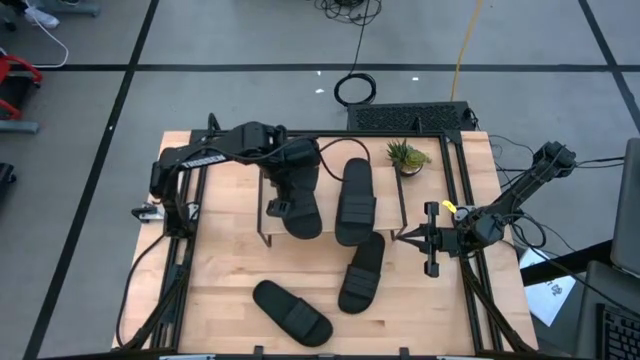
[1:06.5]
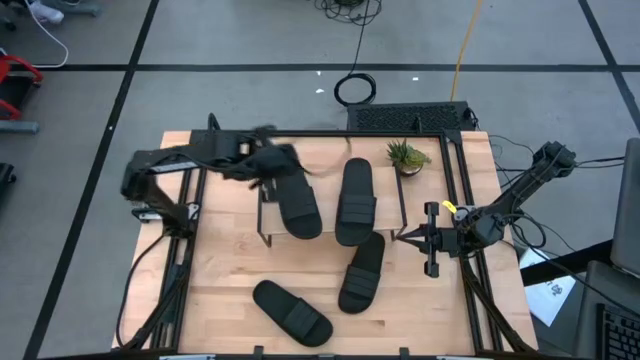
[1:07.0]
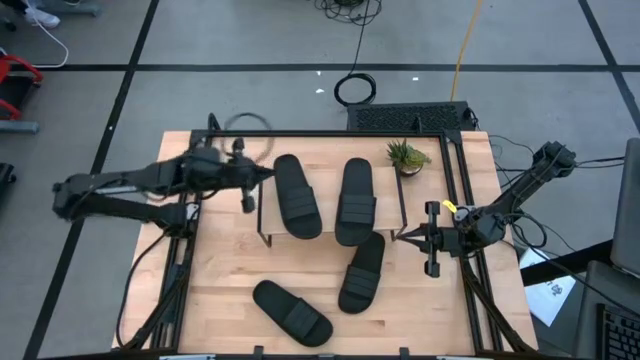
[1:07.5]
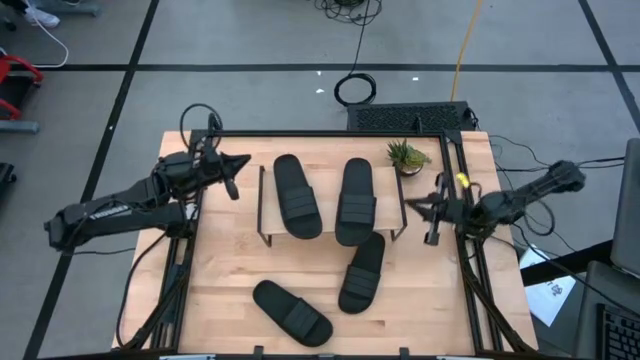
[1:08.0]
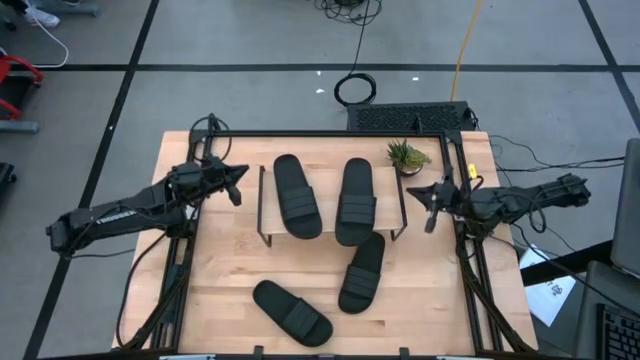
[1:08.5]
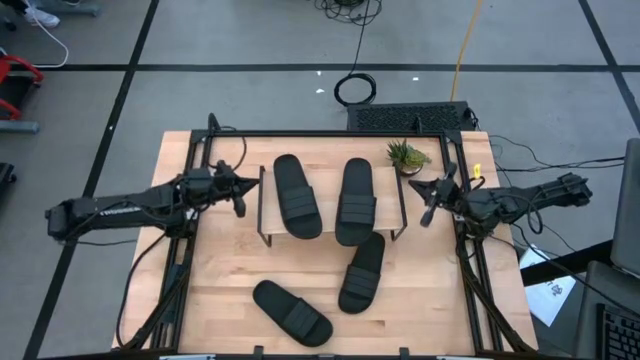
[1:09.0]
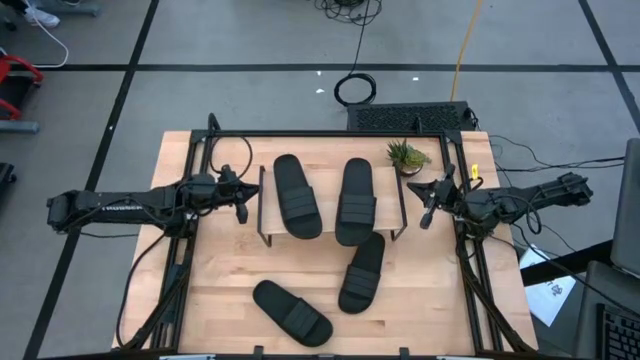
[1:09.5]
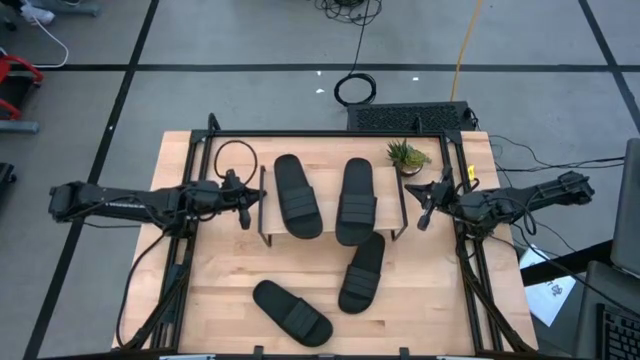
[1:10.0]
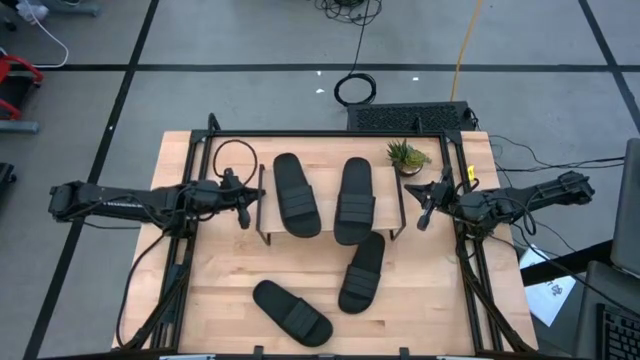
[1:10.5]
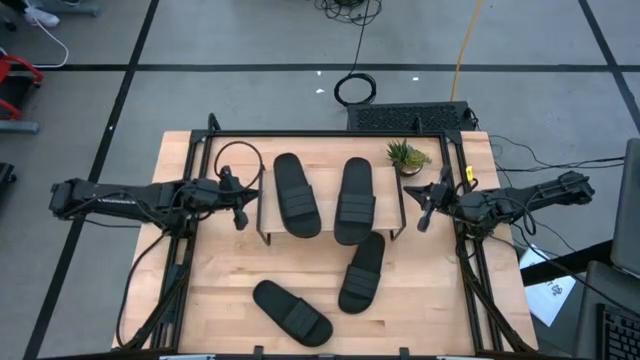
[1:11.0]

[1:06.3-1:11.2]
Task: Pick and place slides into the shelf
Adjust the shelf

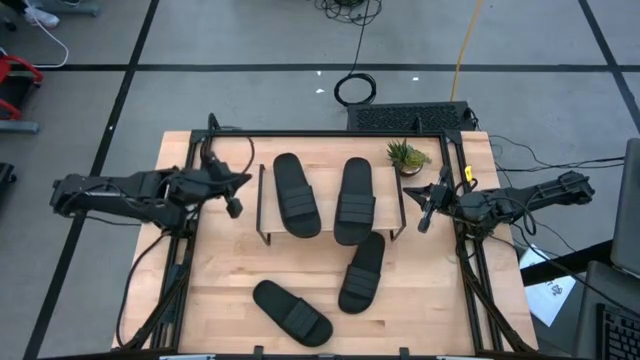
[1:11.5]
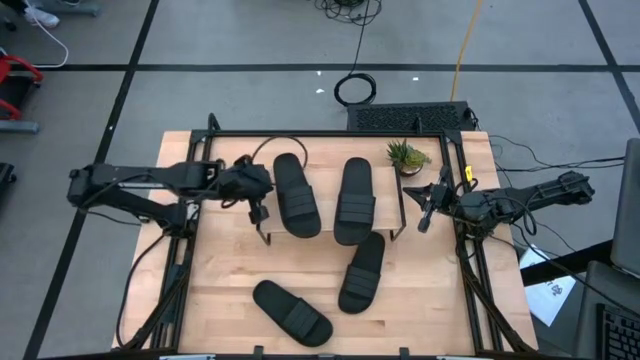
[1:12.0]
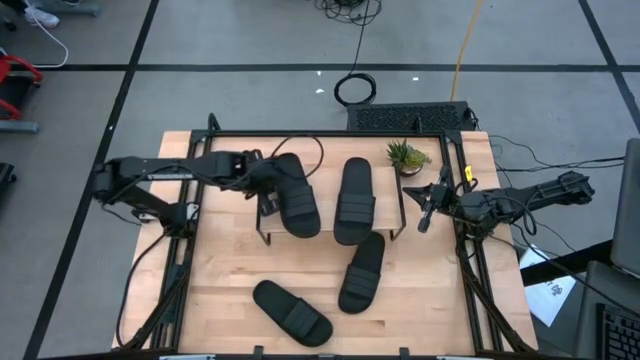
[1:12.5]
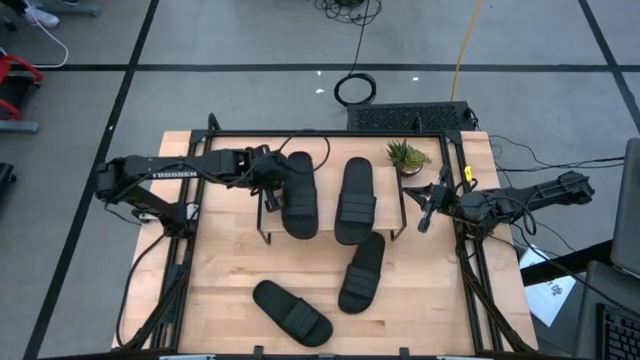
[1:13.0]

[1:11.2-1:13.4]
Adjust the black slide from the shelf

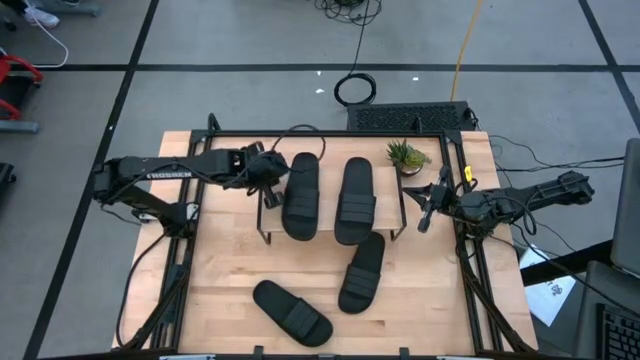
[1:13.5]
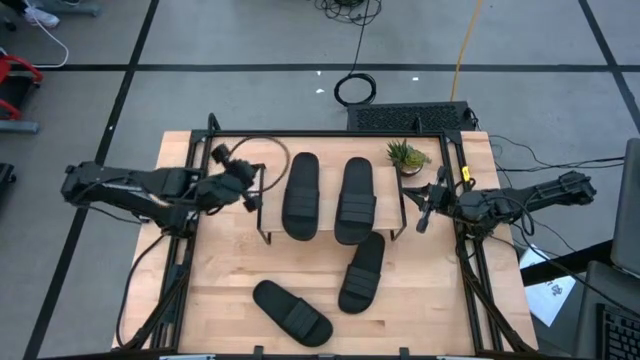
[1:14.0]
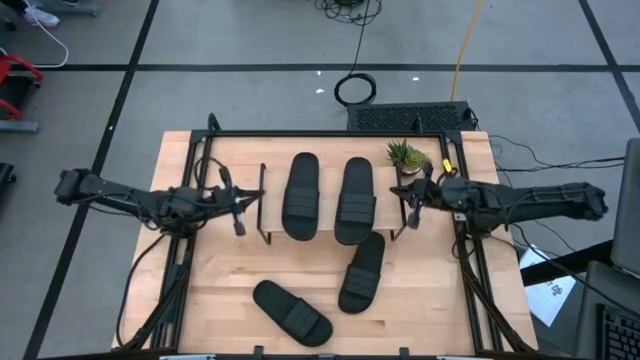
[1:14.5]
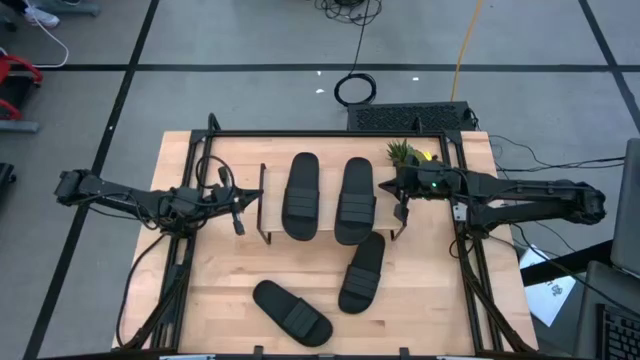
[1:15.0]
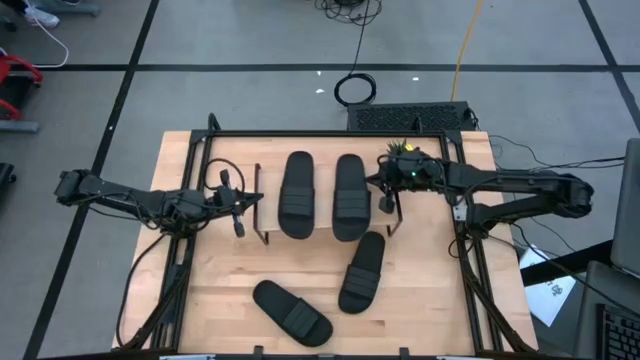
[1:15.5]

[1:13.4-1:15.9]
Adjust the black slide from the shelf

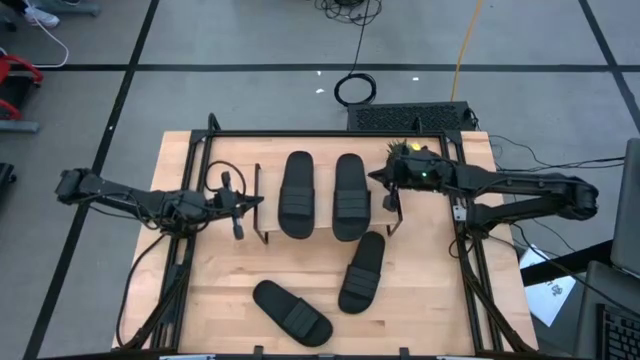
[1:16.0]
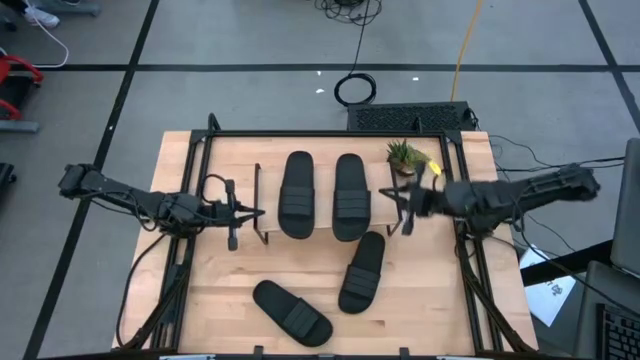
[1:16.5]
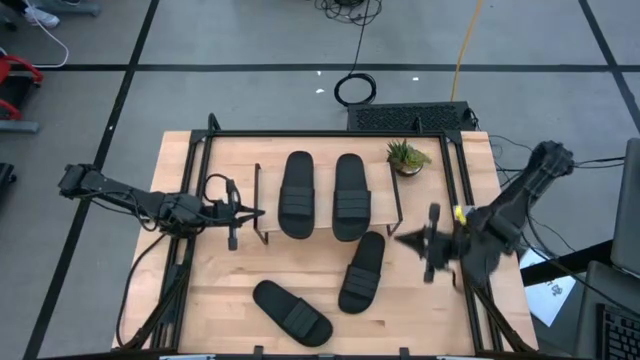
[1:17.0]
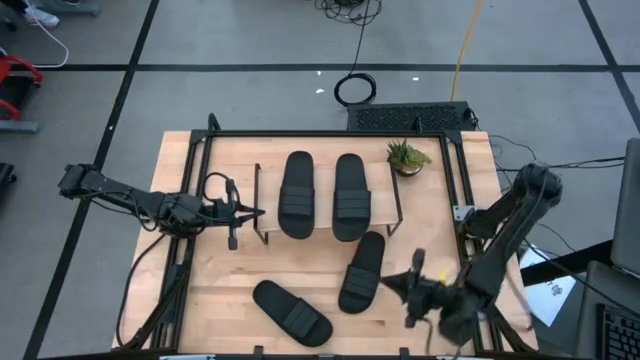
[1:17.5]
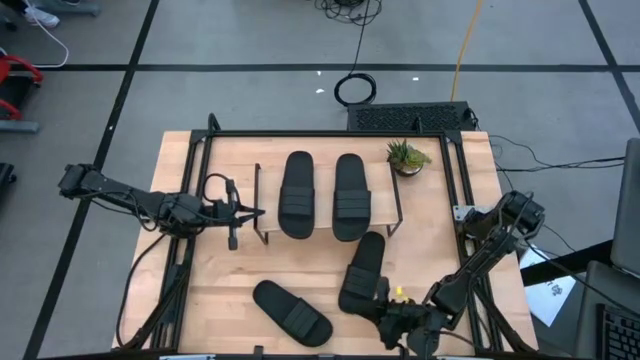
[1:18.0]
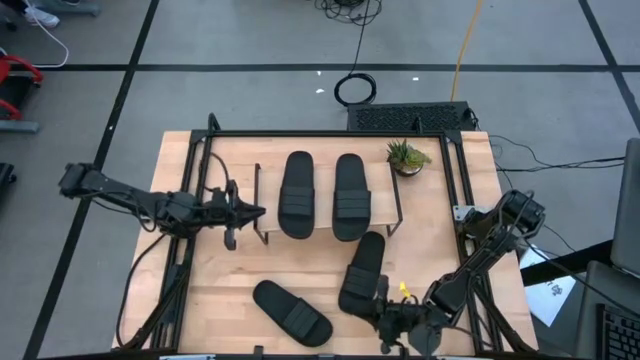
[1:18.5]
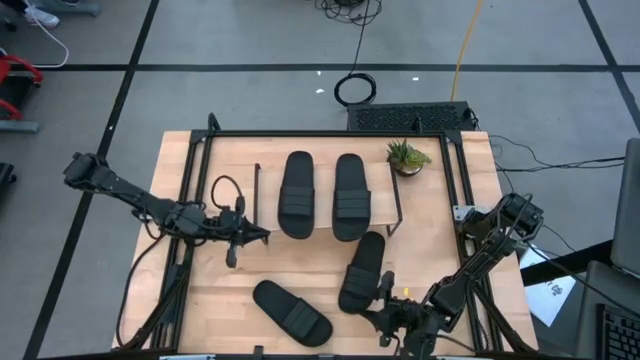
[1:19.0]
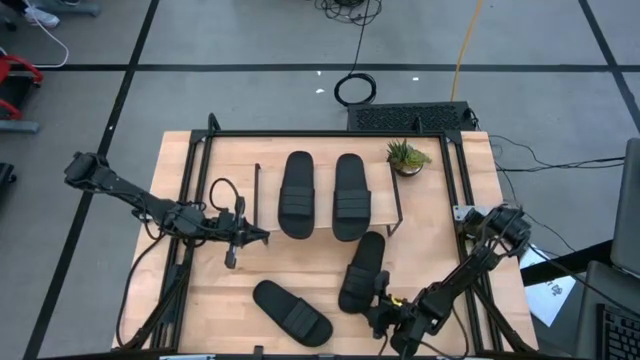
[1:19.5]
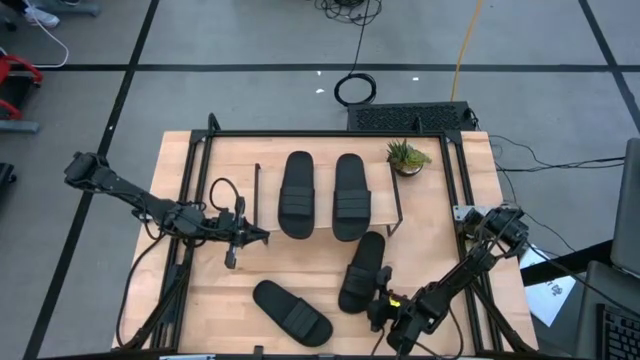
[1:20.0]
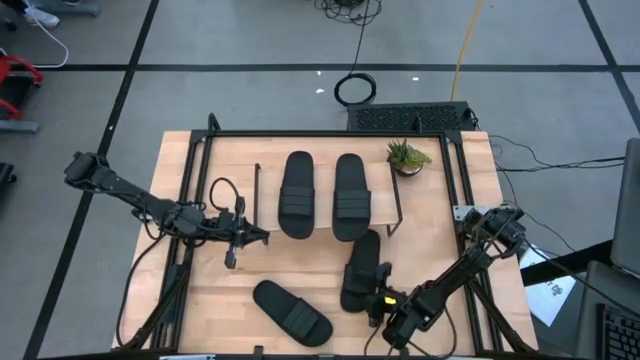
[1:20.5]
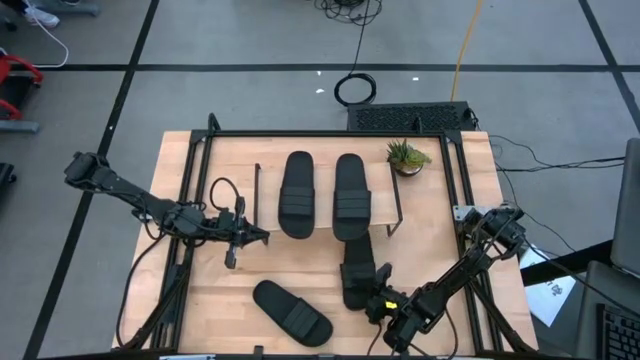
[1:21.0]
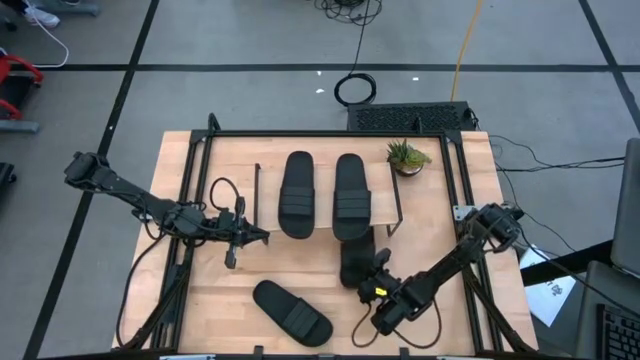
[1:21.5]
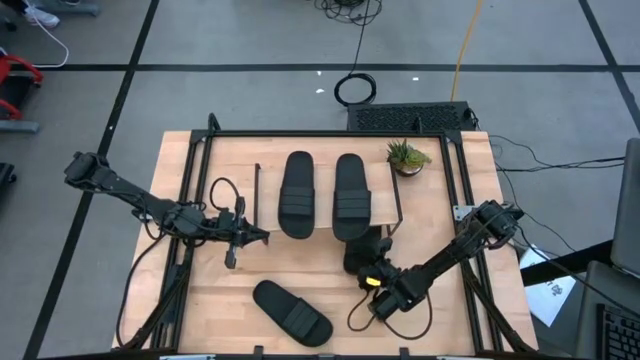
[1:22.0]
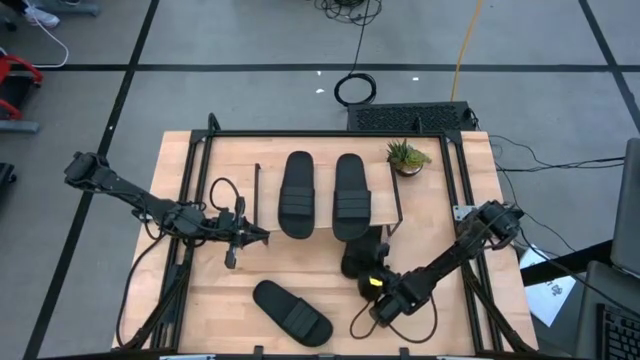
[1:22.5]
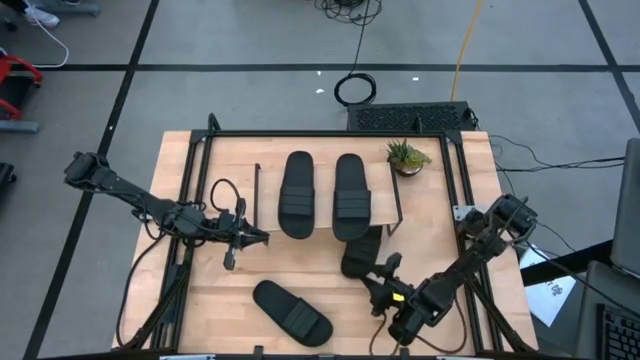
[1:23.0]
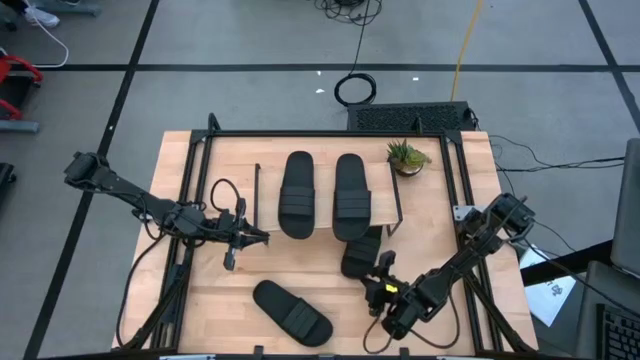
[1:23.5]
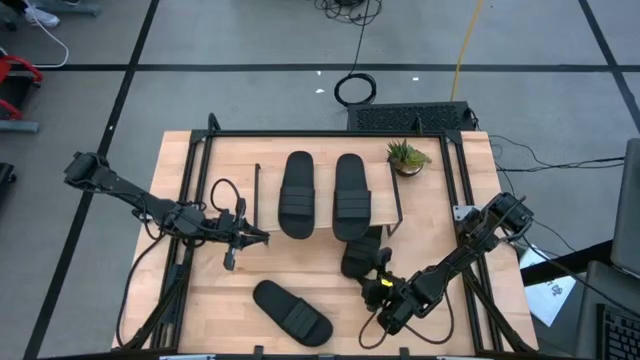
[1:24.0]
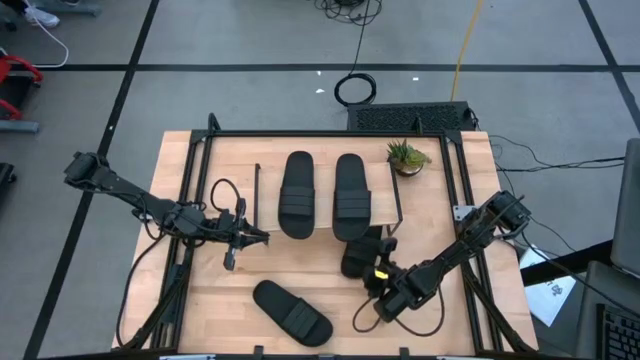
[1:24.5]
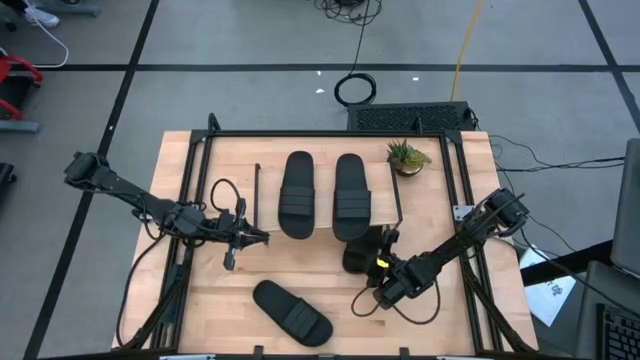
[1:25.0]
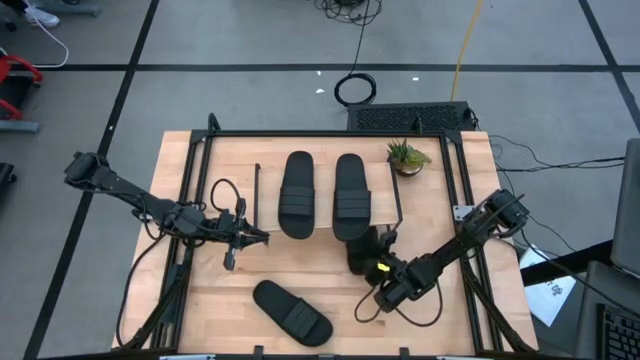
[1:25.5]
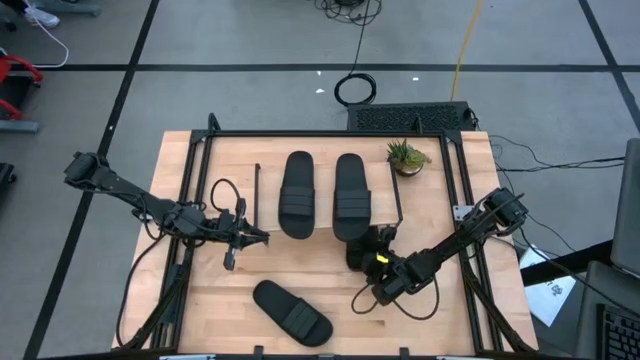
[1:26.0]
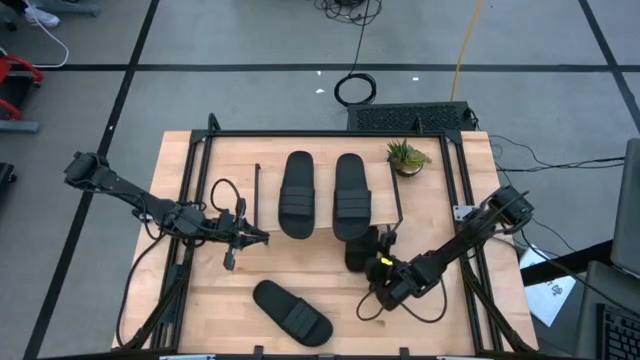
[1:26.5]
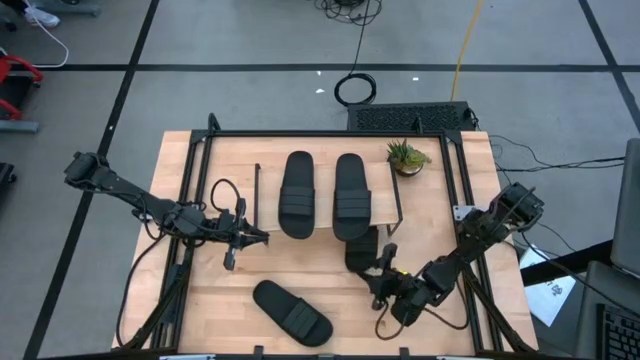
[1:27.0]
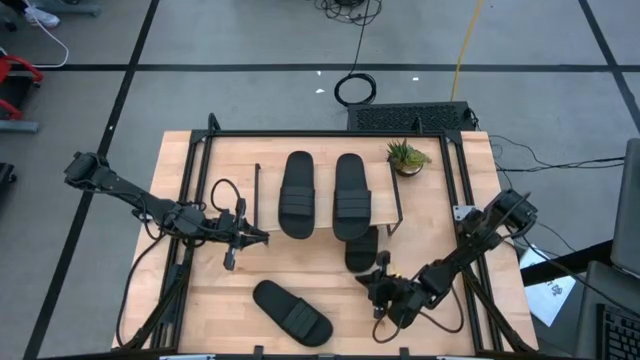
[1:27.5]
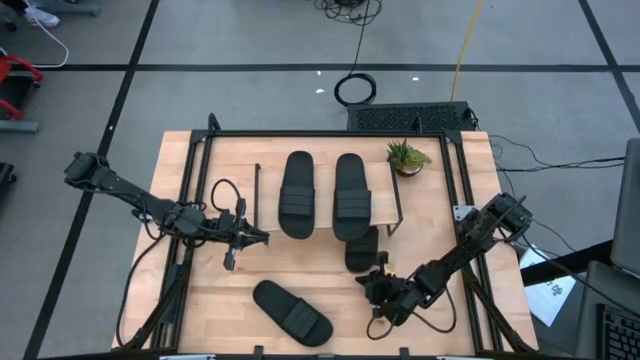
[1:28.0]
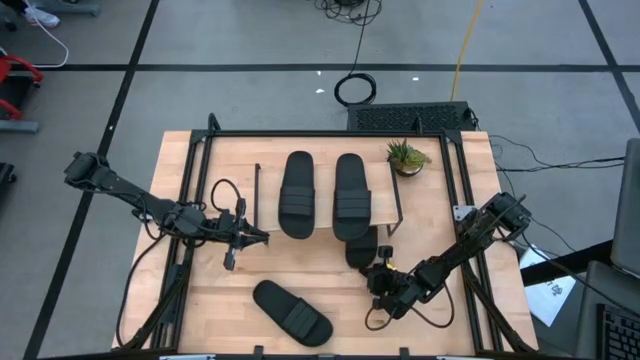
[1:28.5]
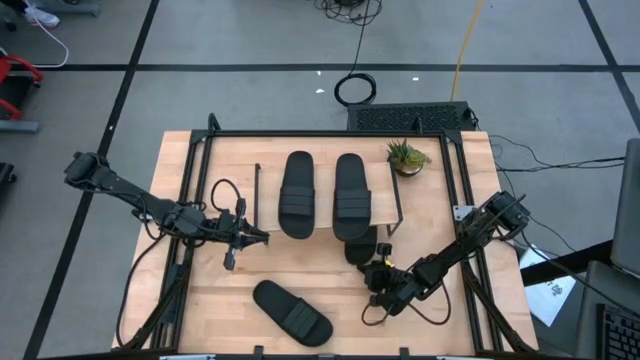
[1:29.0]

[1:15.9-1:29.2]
Put the black slide under the shelf
